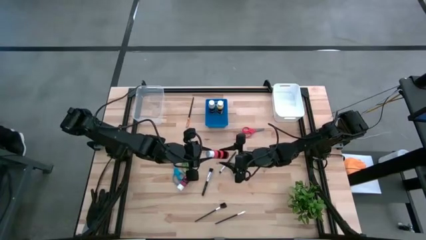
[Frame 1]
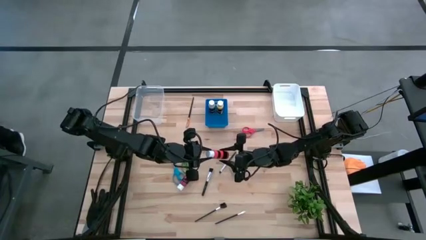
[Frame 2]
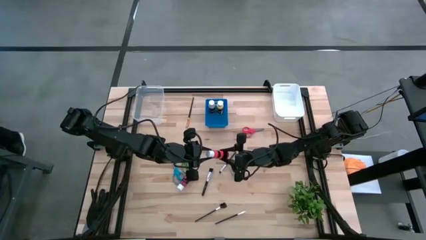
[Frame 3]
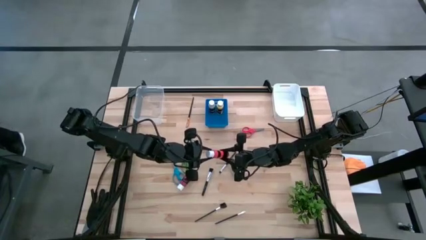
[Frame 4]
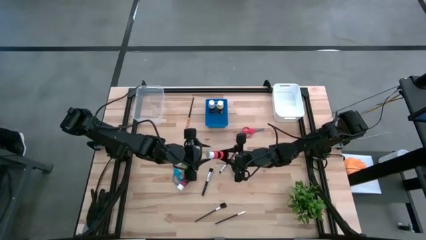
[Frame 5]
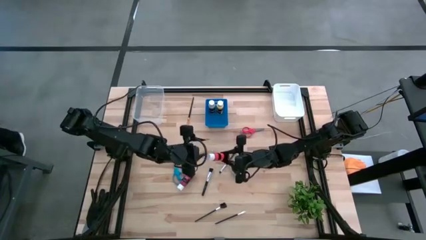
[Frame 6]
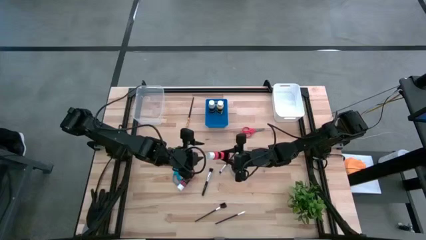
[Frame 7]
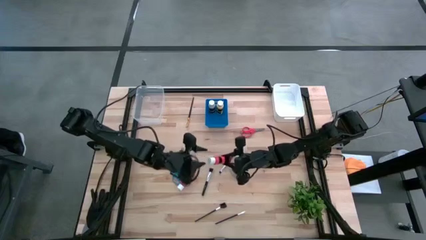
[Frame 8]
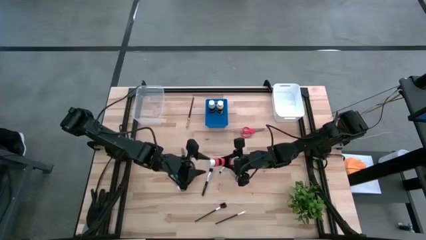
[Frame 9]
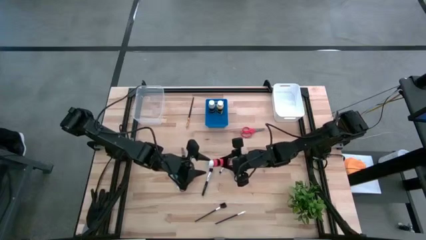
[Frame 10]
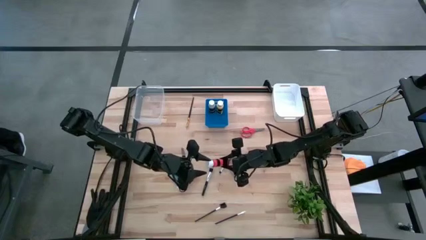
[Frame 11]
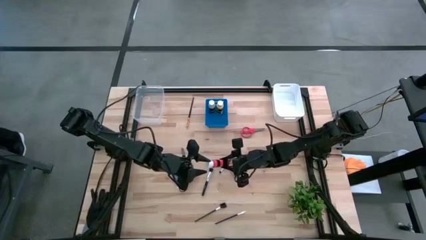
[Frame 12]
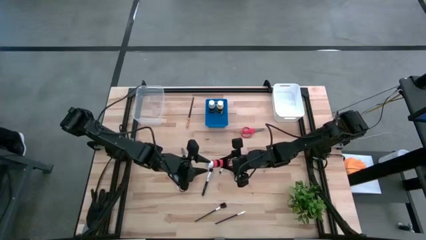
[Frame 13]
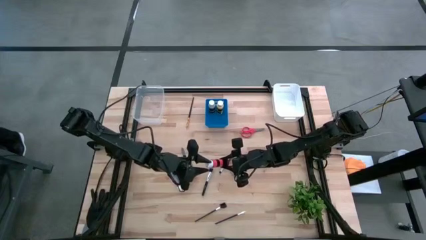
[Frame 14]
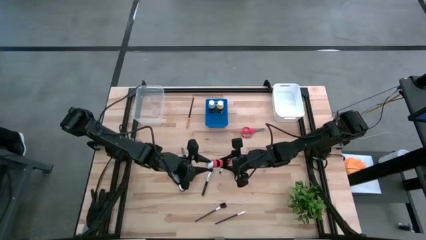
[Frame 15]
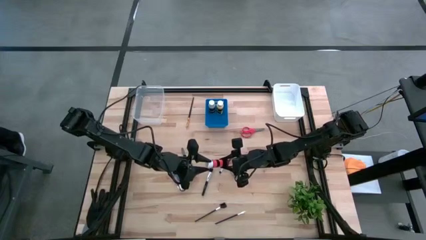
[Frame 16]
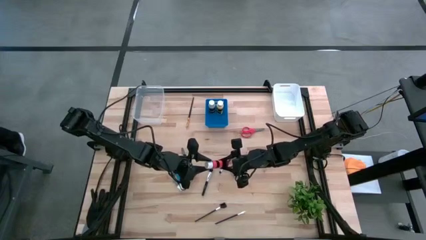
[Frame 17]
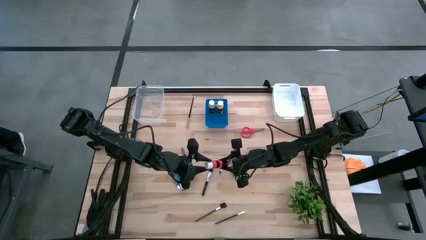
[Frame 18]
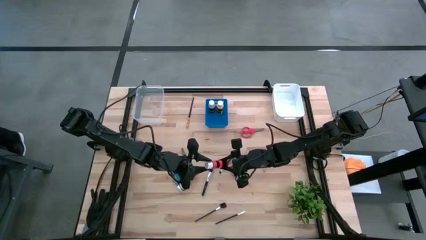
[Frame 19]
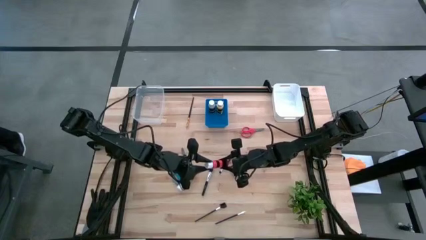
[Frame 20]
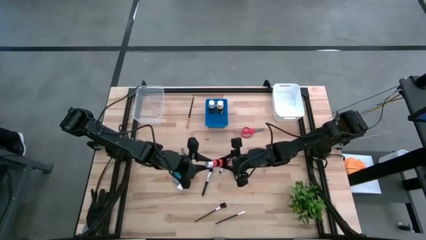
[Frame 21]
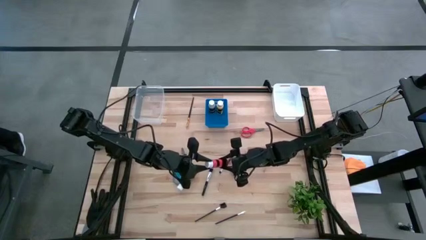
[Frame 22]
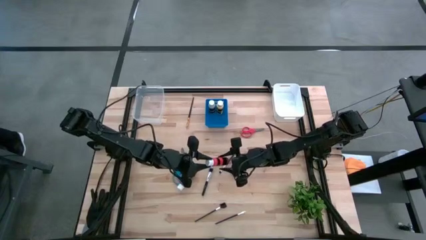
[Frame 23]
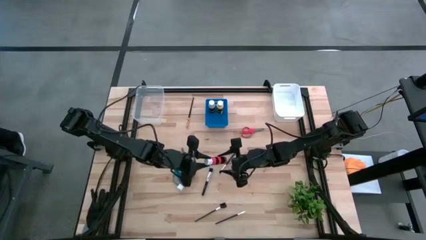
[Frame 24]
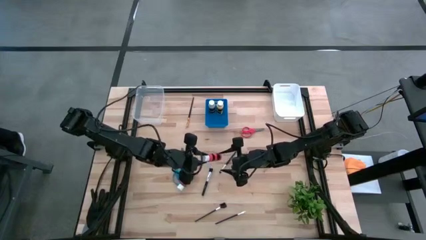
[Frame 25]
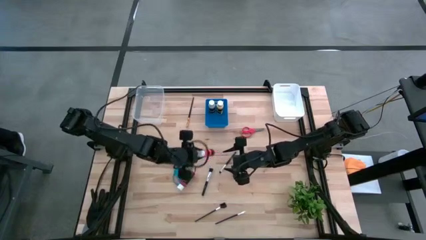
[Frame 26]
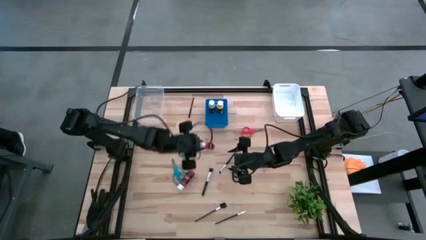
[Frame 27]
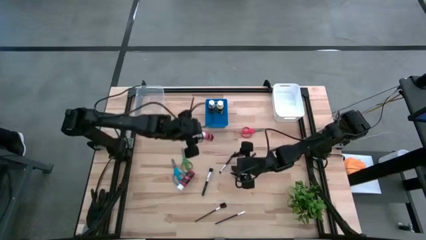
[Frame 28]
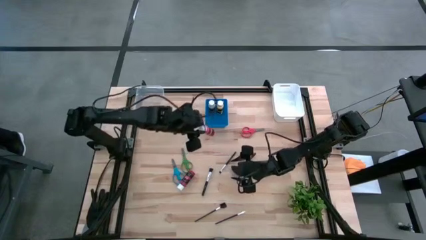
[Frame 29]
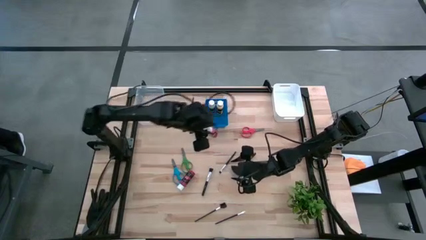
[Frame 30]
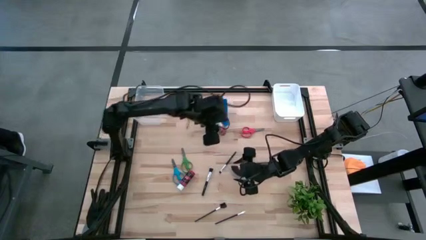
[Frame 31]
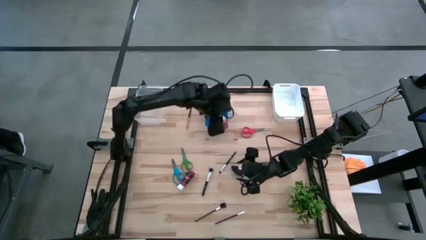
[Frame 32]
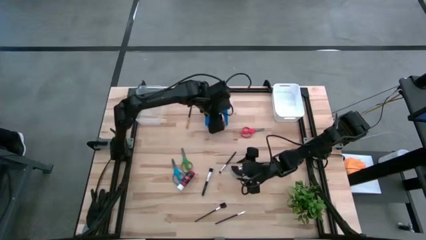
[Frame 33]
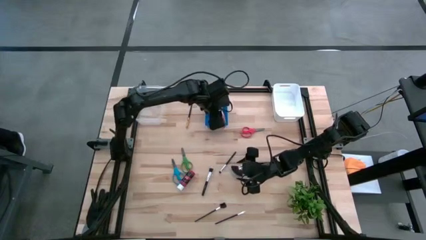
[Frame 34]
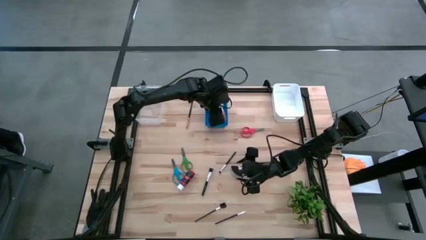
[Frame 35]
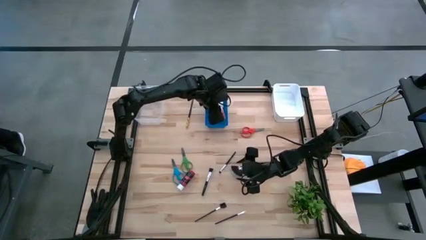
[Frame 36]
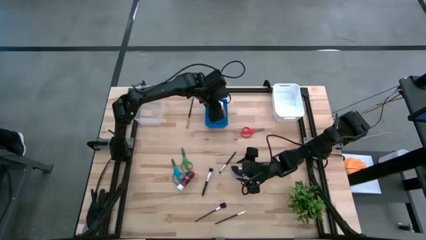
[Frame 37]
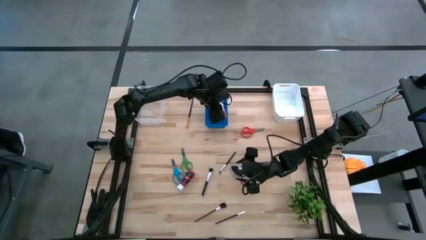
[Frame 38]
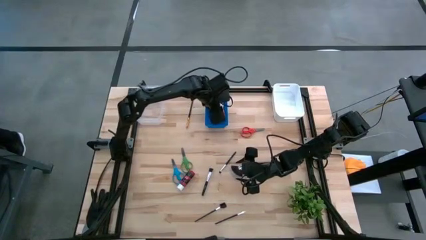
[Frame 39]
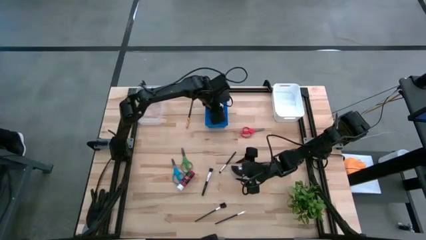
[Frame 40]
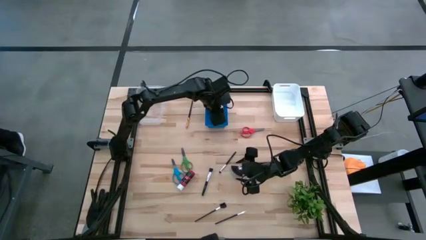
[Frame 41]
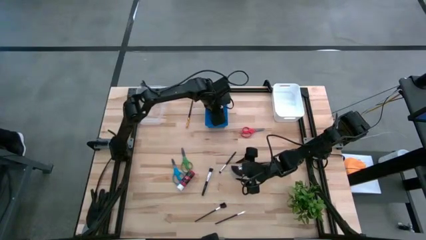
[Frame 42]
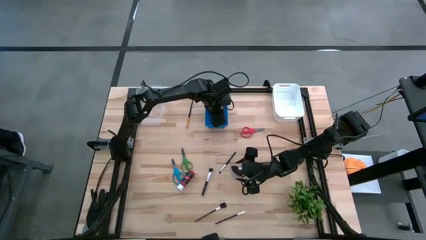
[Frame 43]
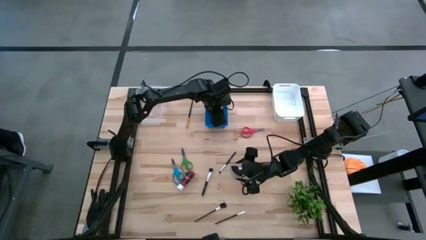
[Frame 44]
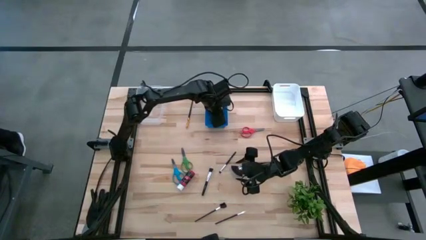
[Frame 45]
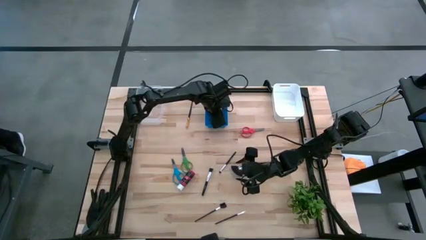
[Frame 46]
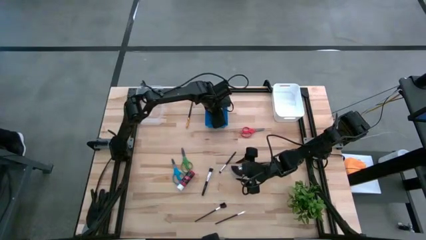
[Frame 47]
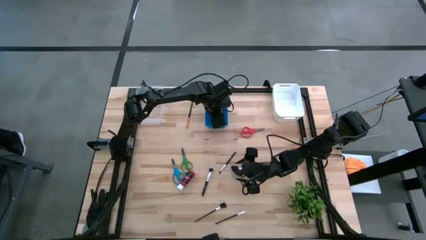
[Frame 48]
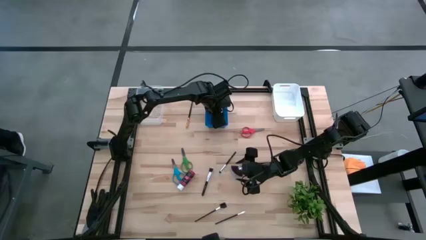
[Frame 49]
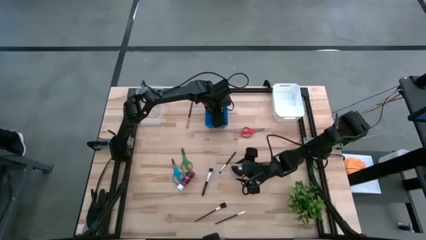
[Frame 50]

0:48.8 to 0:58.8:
Task: Pick & Place Paint Supplies
Put the orange paint bottle into the blue bin
